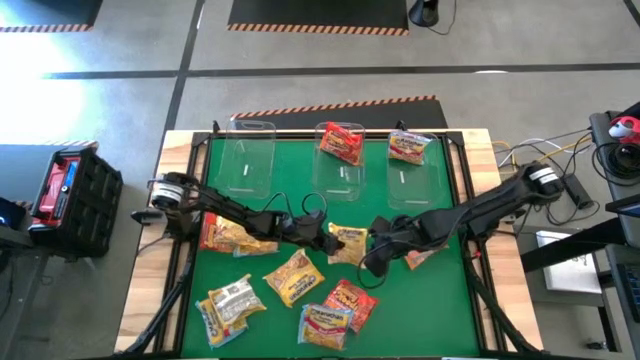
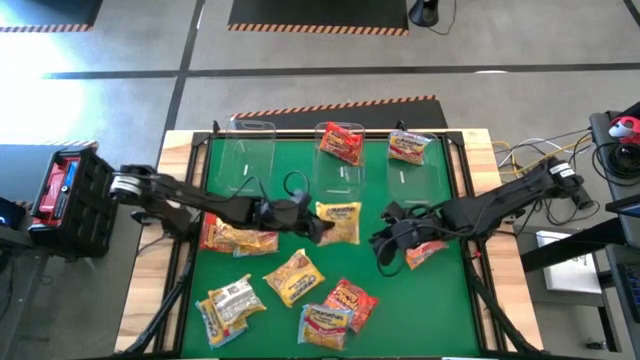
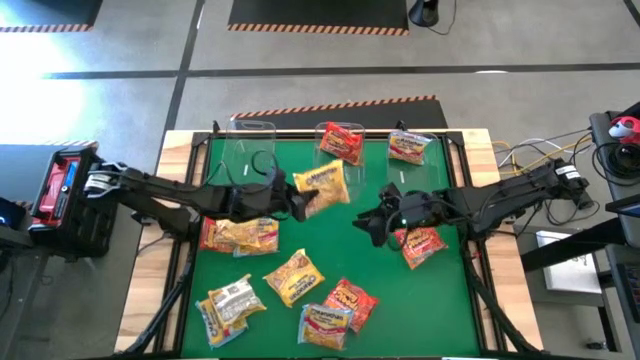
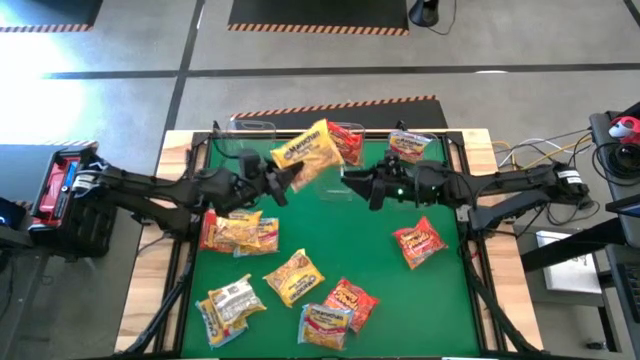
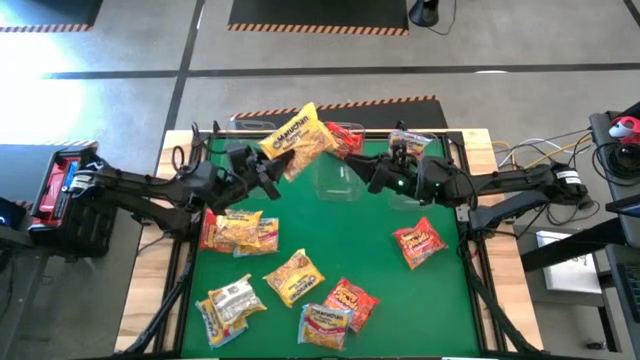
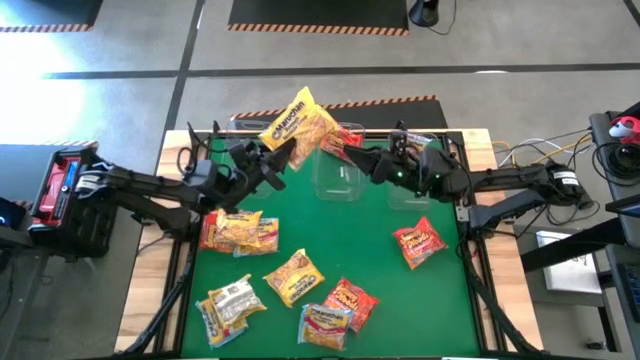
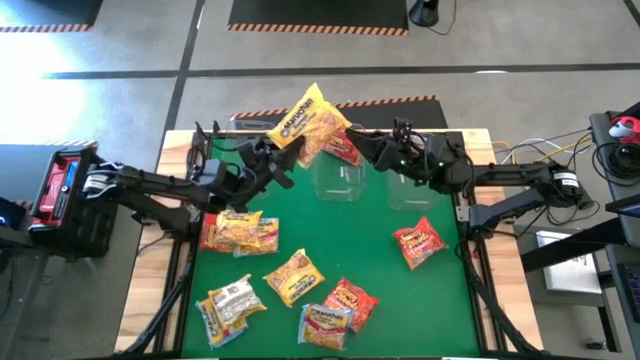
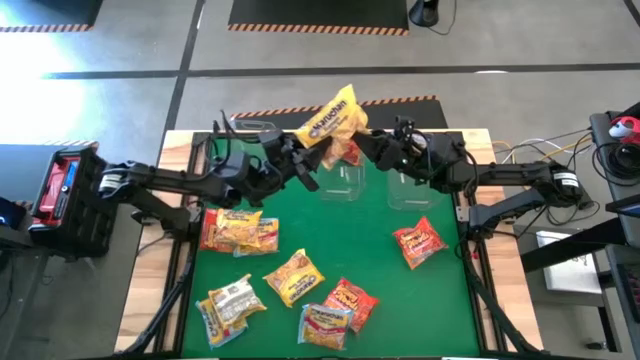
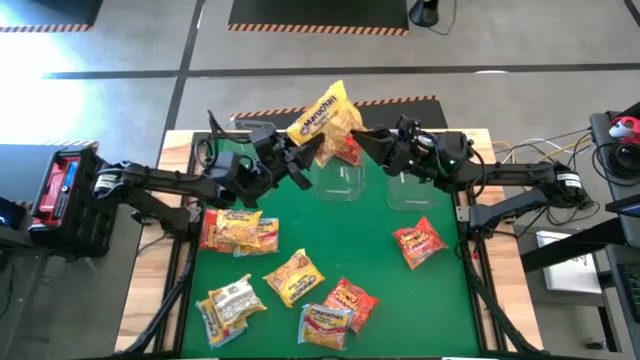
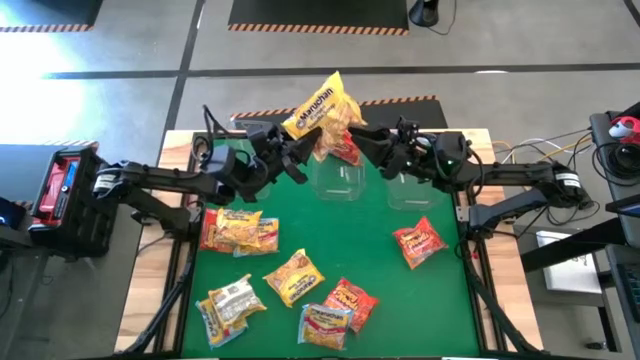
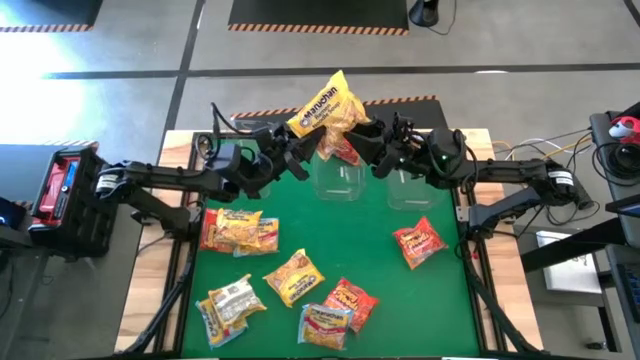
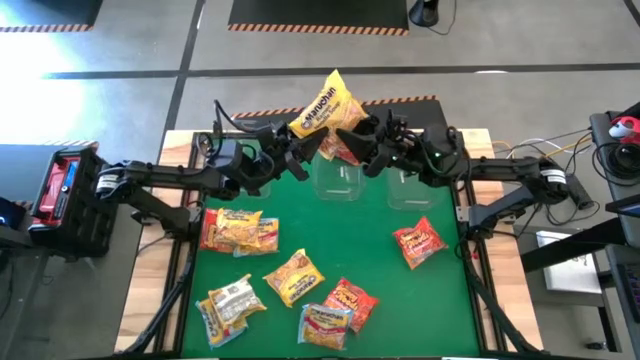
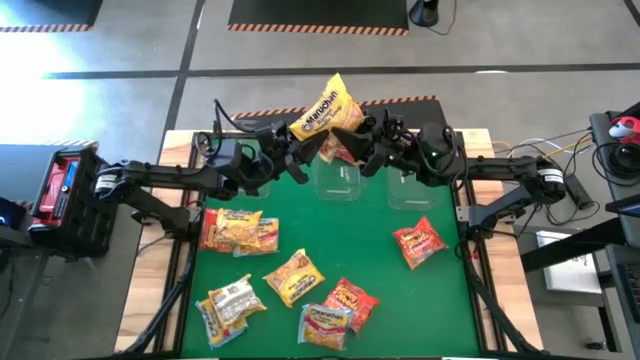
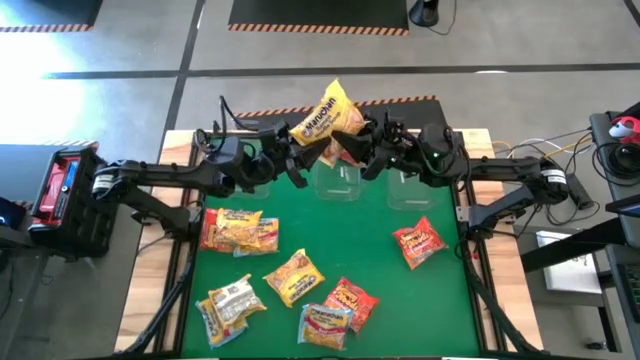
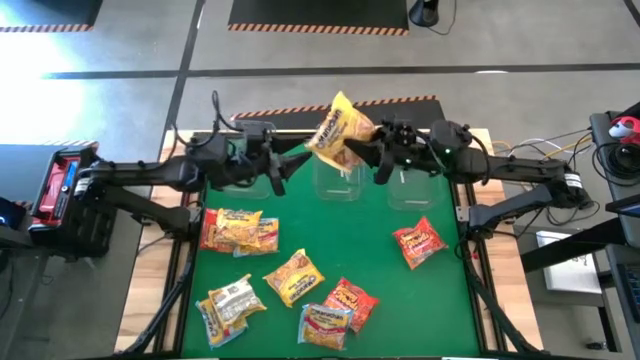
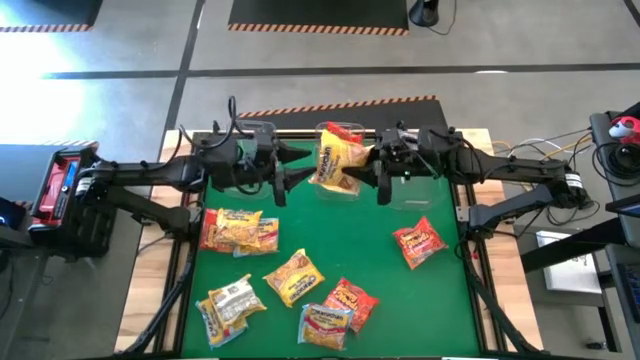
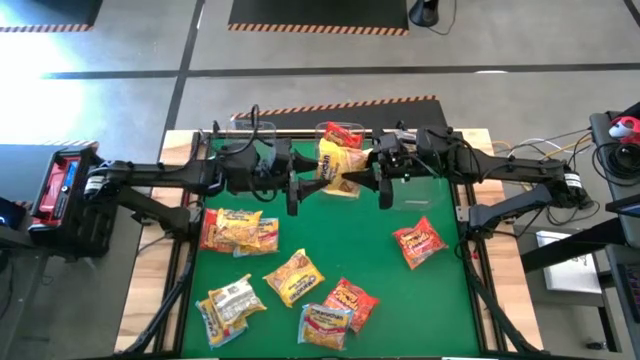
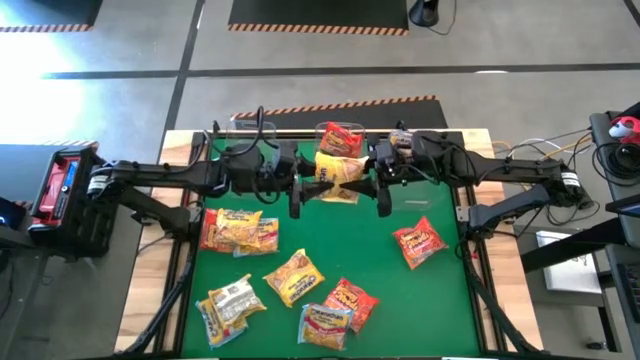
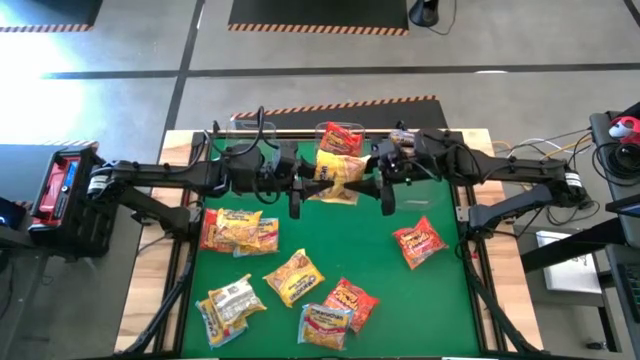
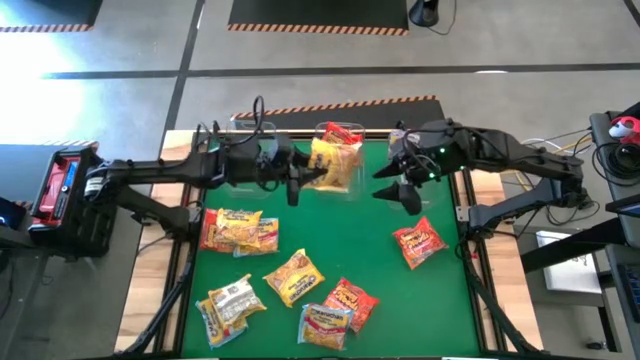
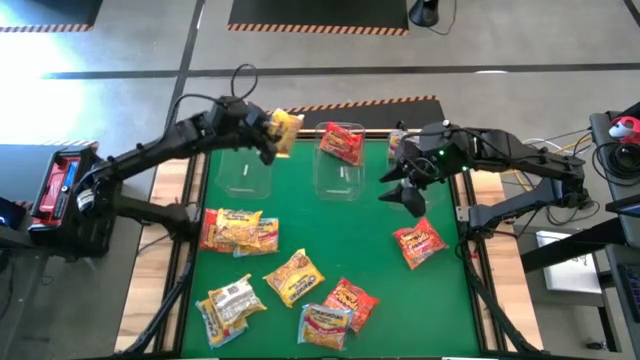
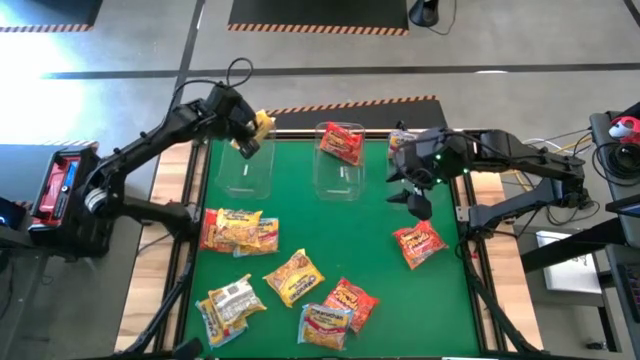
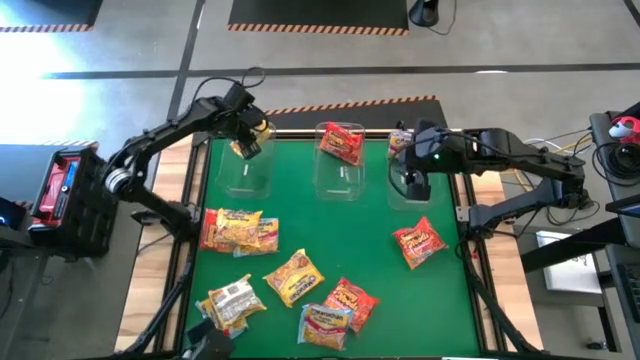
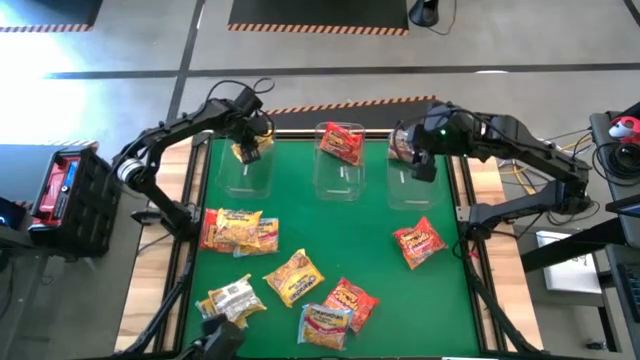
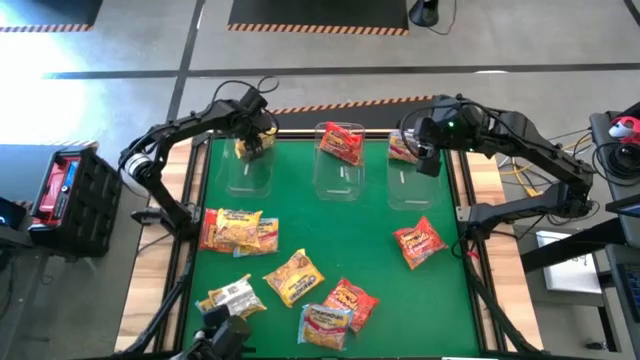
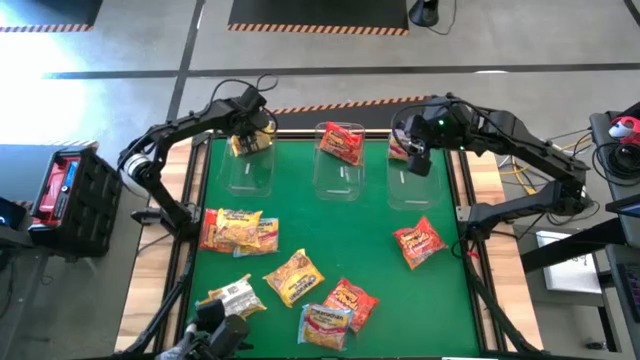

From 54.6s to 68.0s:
Task: Sort Maruchan noodles
Put the yellow noodle pack into the left transparent bin

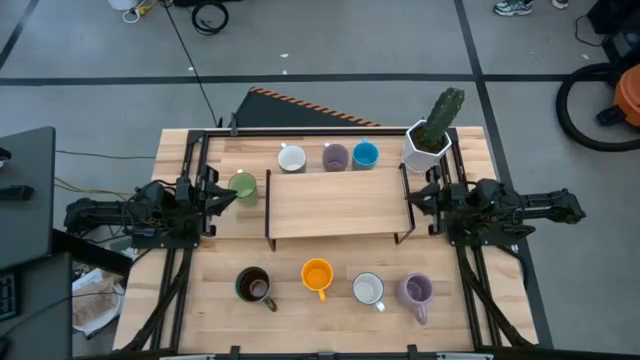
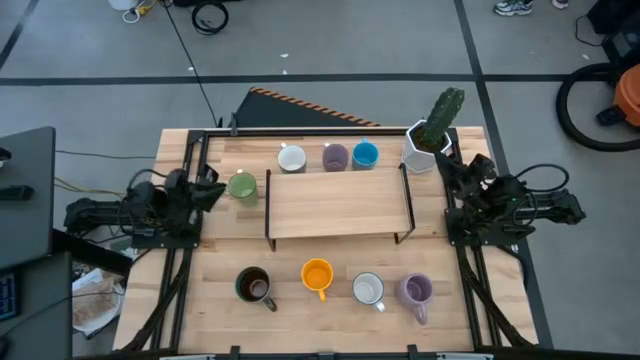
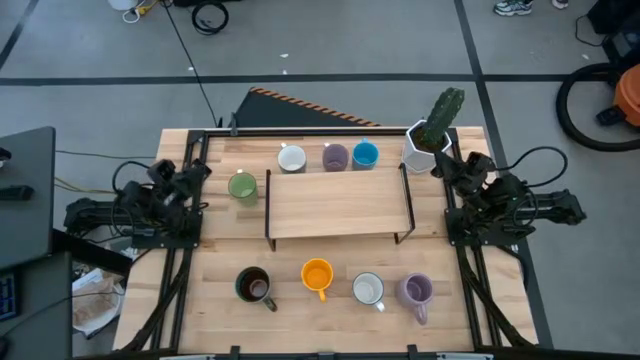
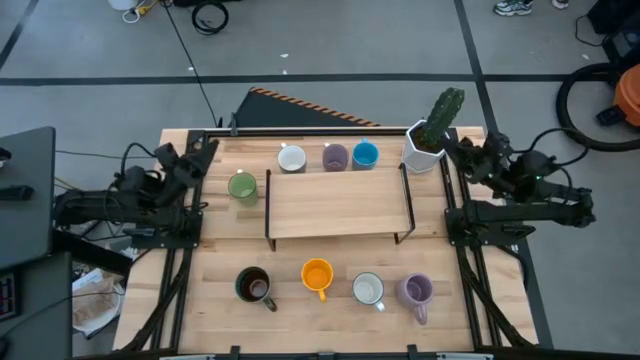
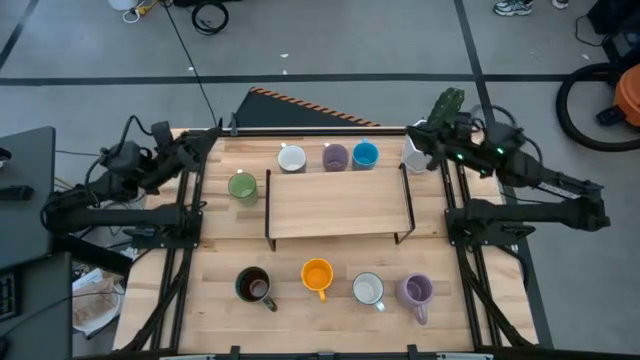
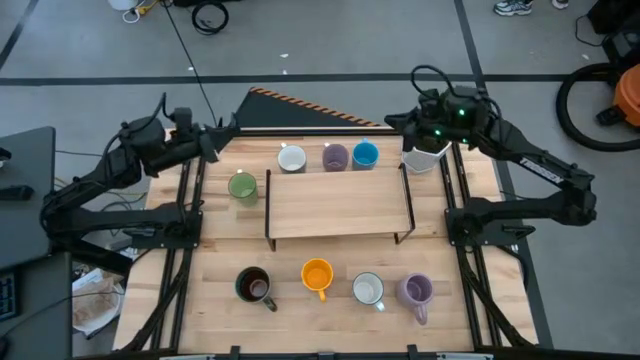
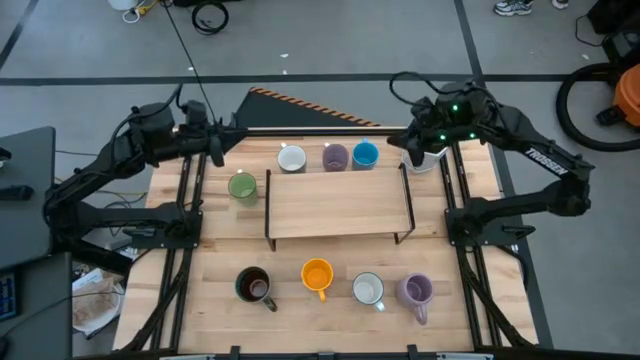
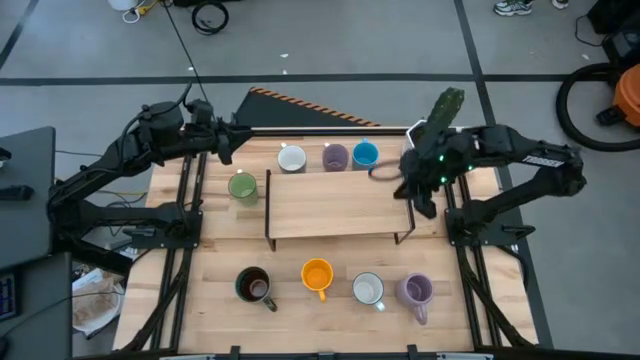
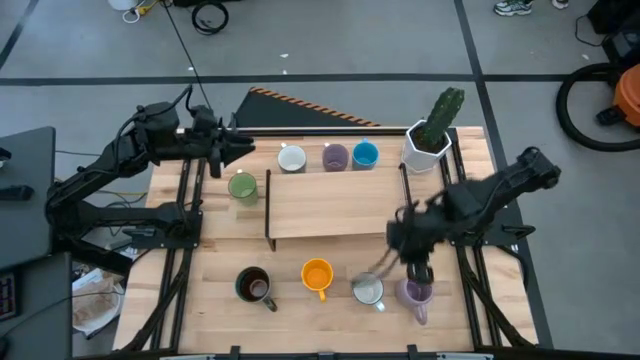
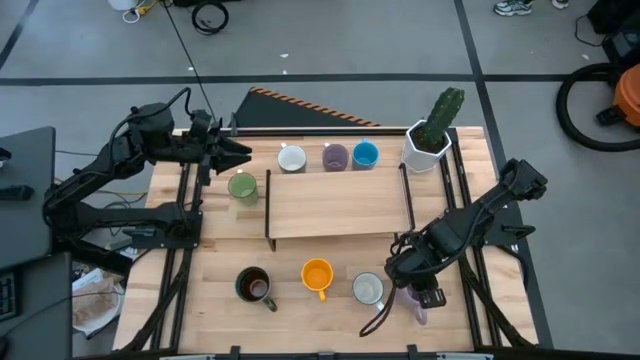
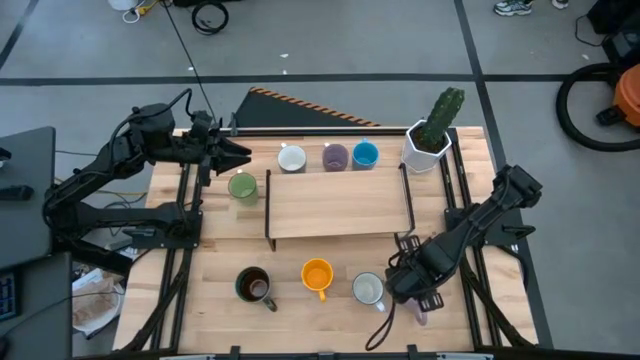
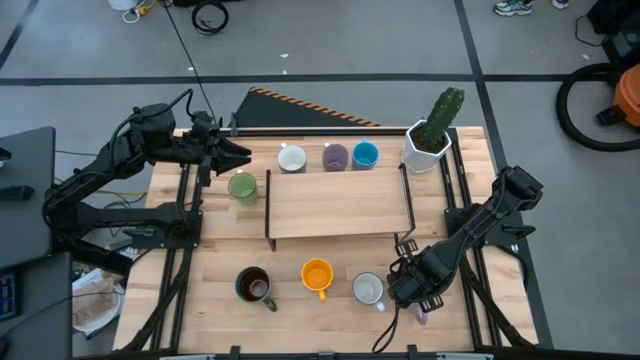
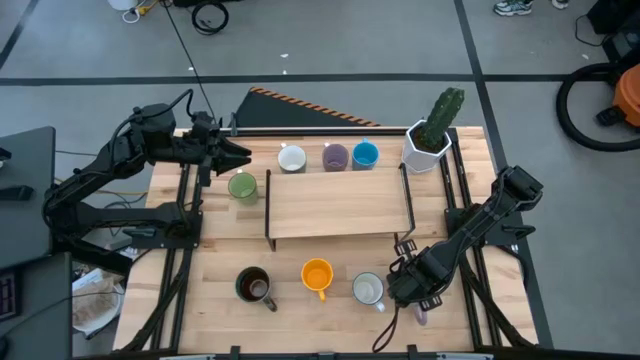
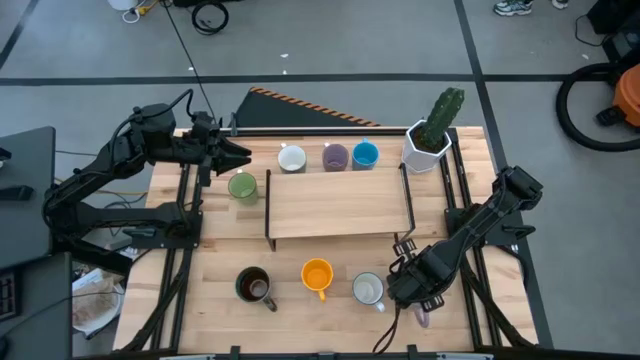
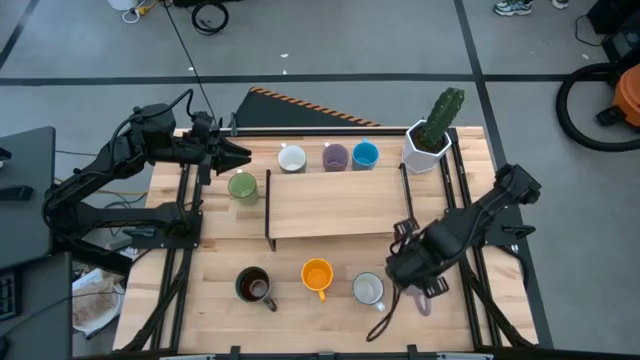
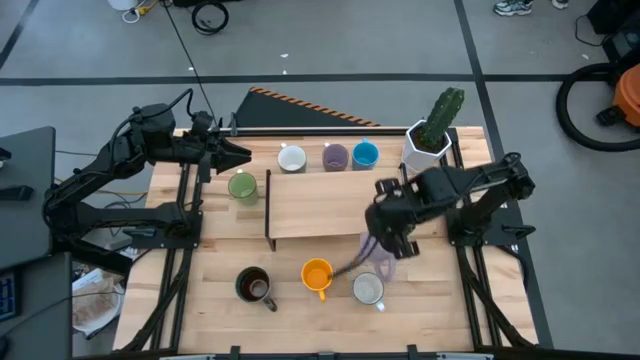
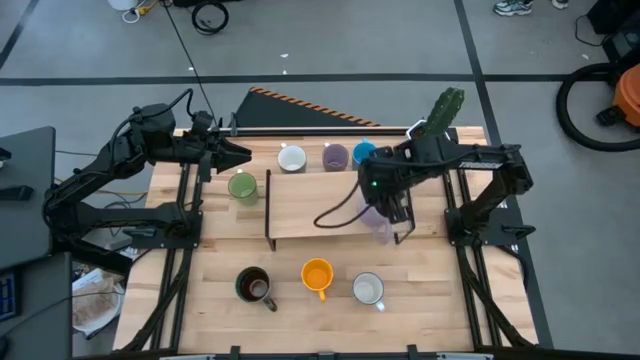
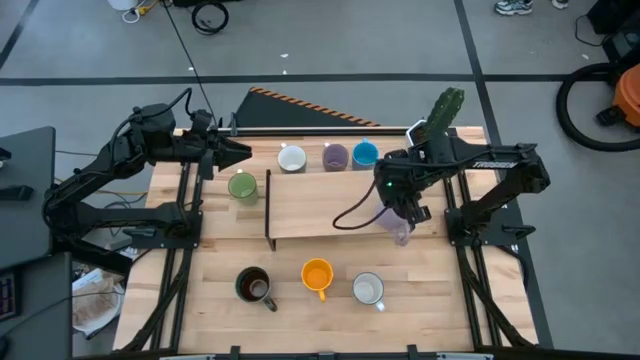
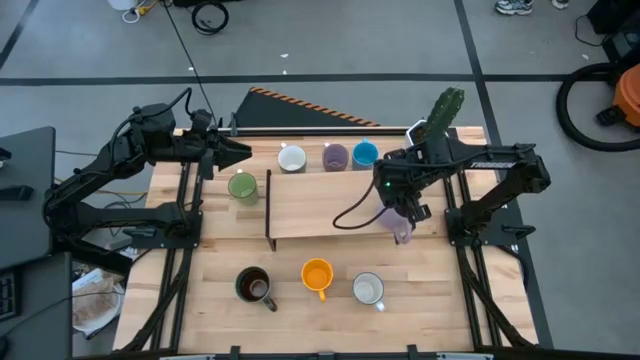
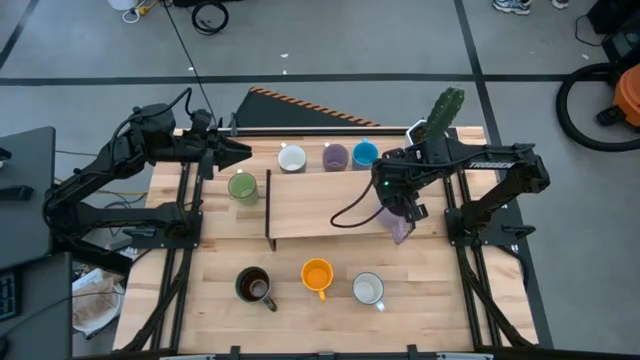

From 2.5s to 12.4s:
Task: Place coffee mugs
Put the bottom violet mug on the shelf
